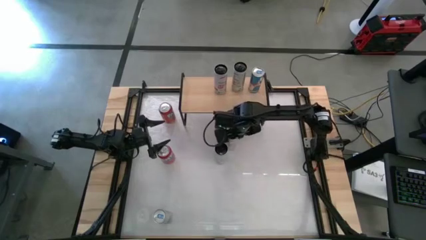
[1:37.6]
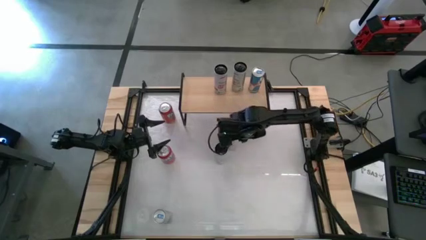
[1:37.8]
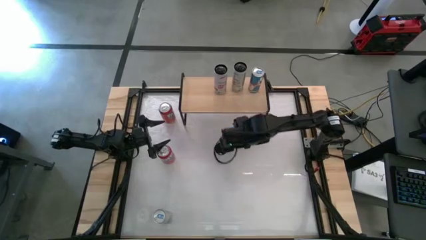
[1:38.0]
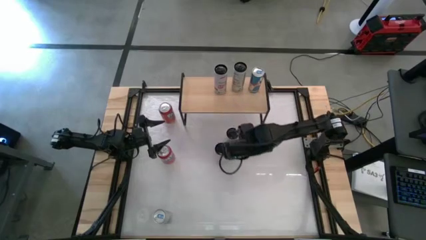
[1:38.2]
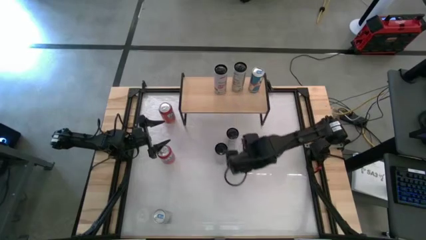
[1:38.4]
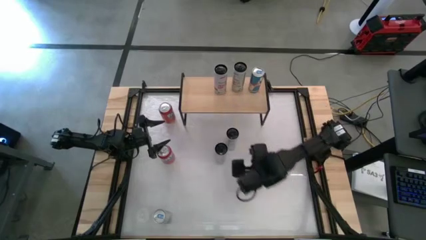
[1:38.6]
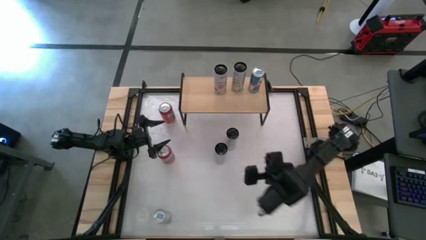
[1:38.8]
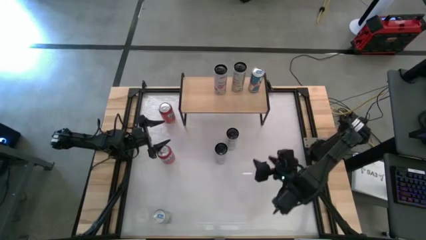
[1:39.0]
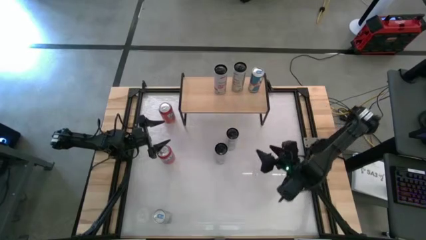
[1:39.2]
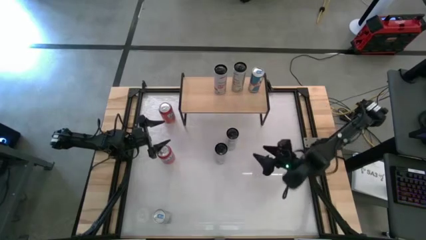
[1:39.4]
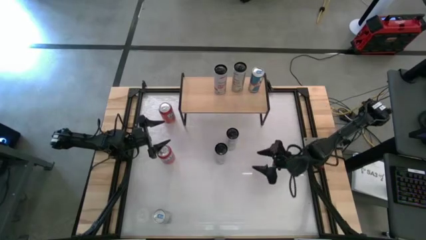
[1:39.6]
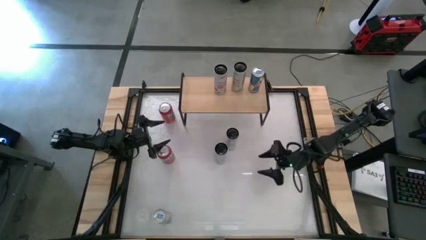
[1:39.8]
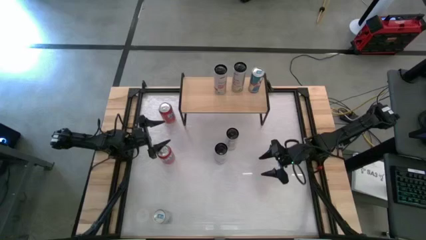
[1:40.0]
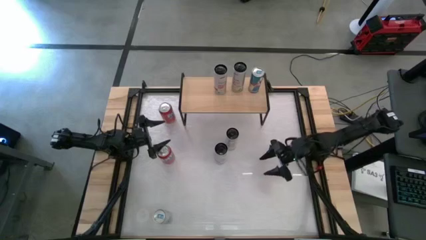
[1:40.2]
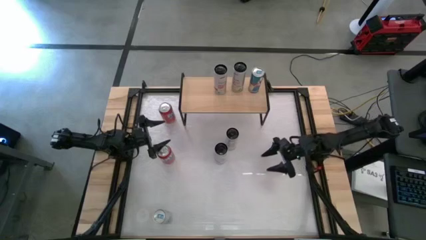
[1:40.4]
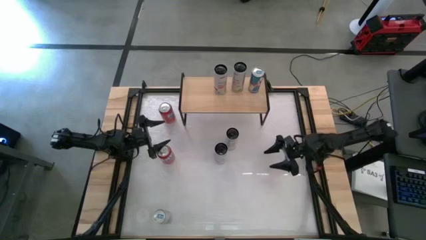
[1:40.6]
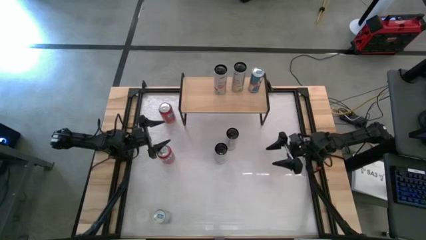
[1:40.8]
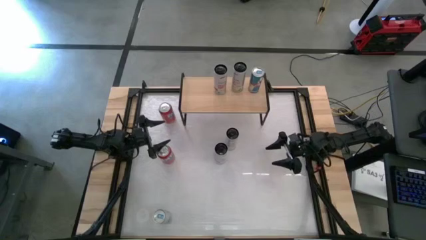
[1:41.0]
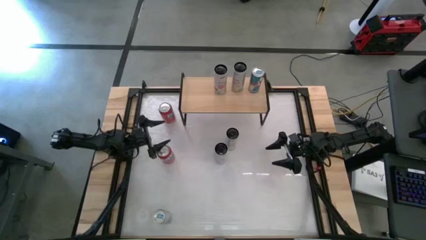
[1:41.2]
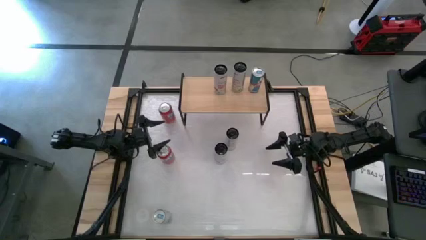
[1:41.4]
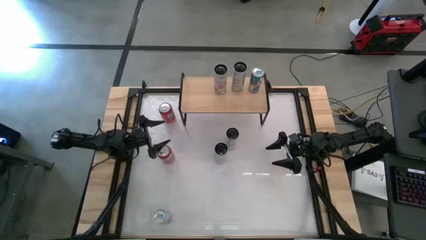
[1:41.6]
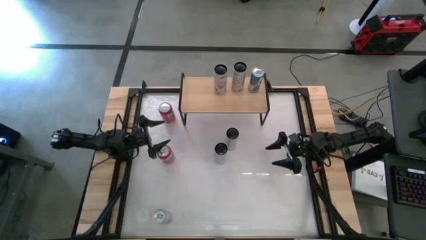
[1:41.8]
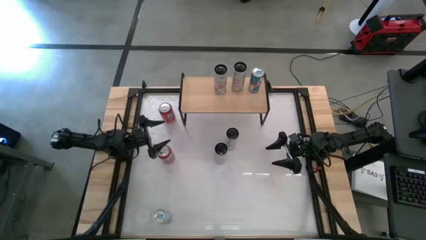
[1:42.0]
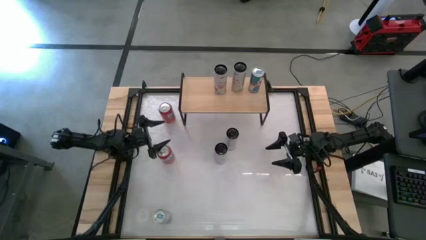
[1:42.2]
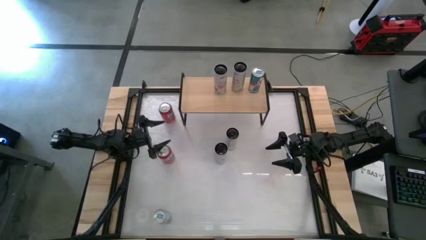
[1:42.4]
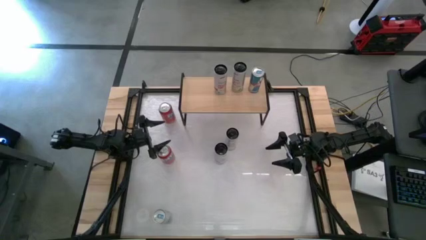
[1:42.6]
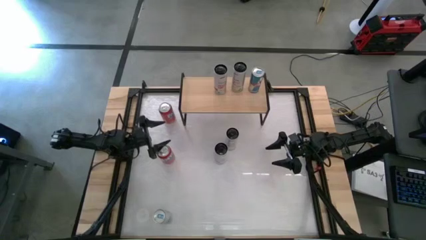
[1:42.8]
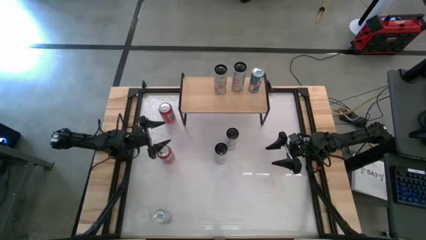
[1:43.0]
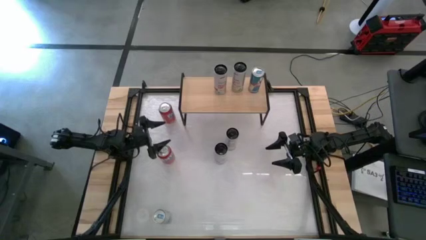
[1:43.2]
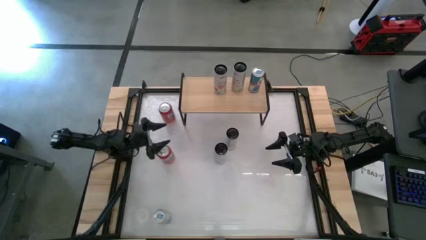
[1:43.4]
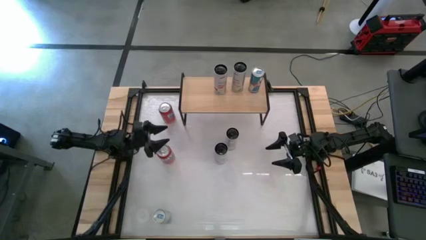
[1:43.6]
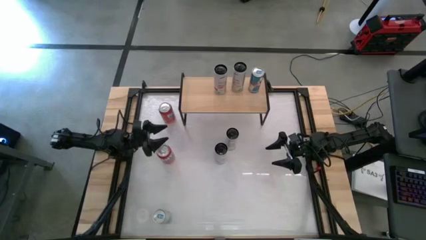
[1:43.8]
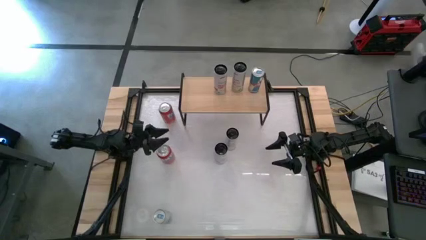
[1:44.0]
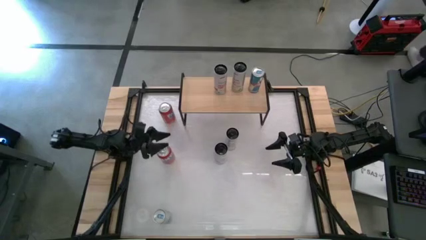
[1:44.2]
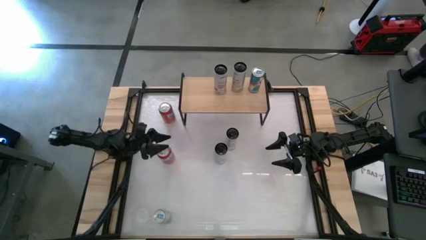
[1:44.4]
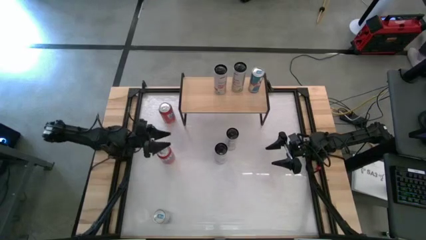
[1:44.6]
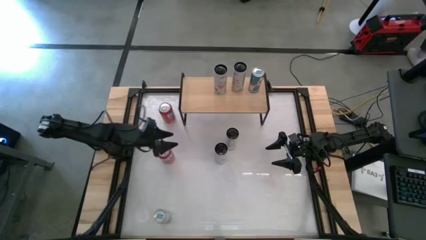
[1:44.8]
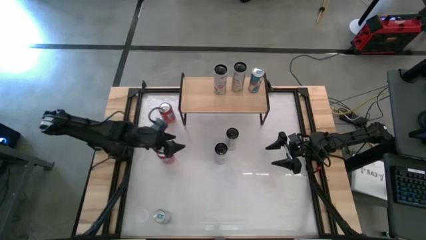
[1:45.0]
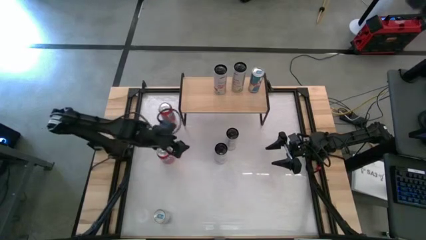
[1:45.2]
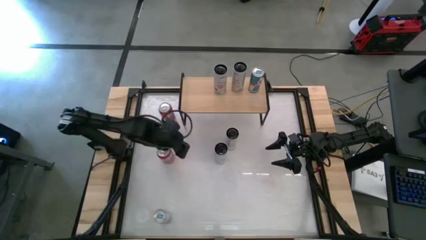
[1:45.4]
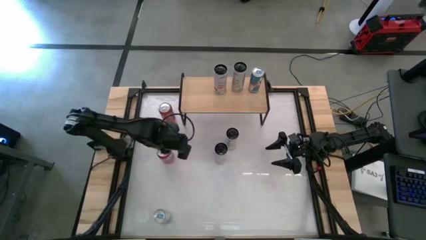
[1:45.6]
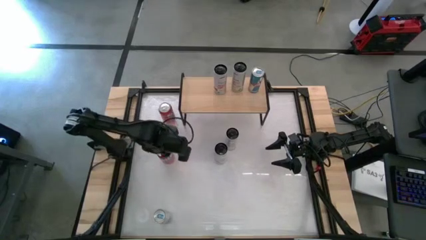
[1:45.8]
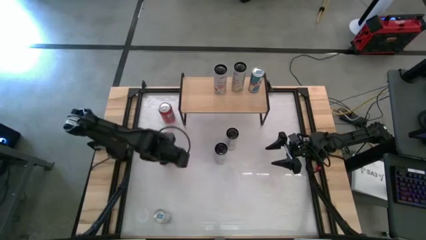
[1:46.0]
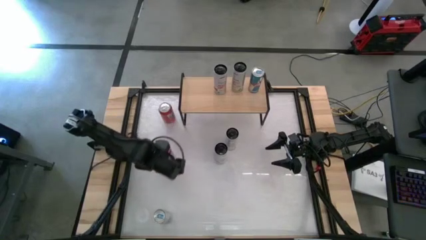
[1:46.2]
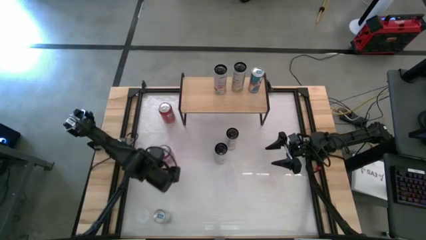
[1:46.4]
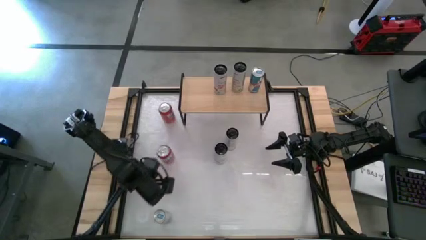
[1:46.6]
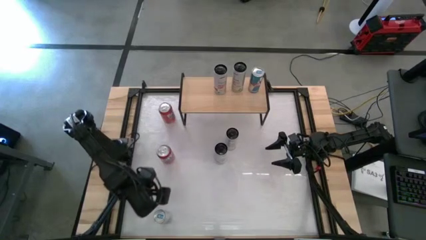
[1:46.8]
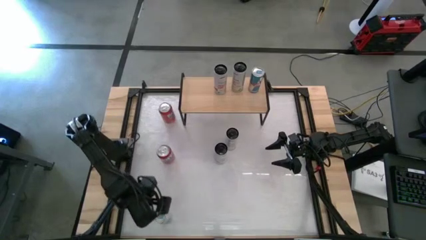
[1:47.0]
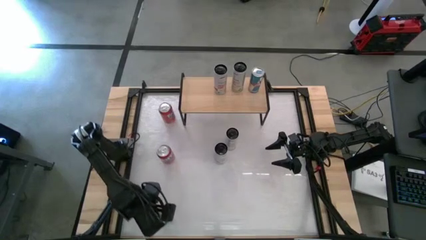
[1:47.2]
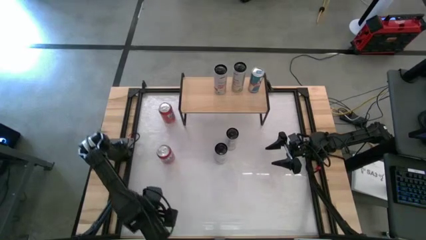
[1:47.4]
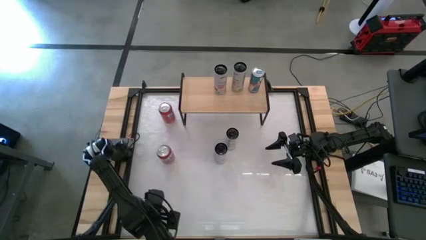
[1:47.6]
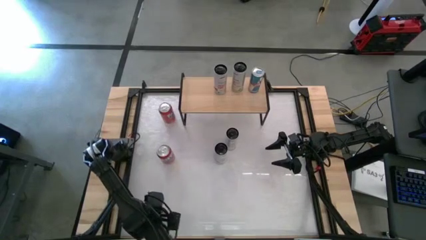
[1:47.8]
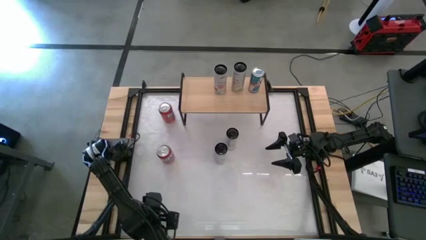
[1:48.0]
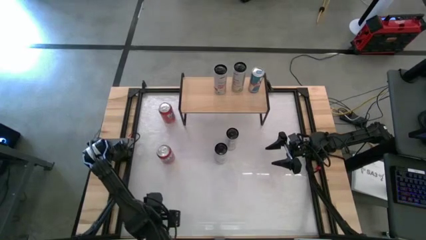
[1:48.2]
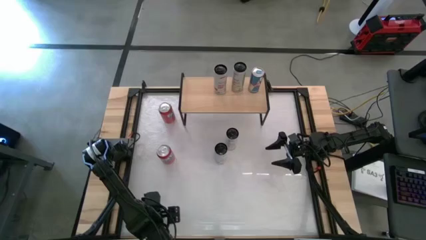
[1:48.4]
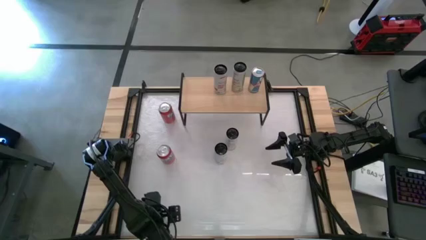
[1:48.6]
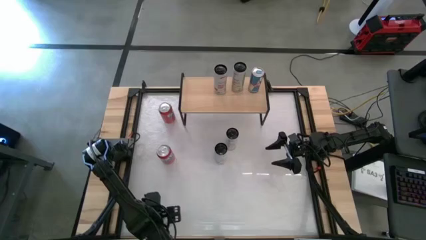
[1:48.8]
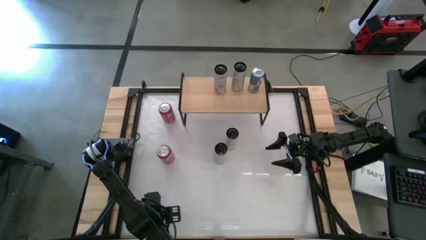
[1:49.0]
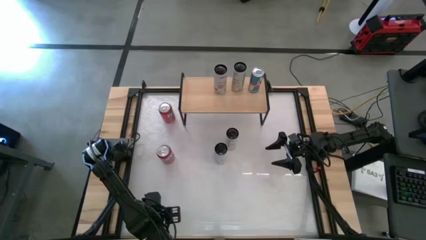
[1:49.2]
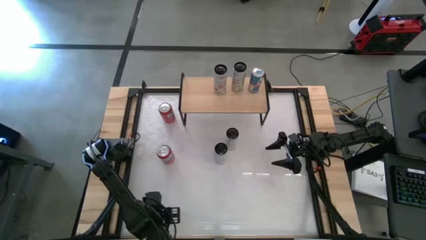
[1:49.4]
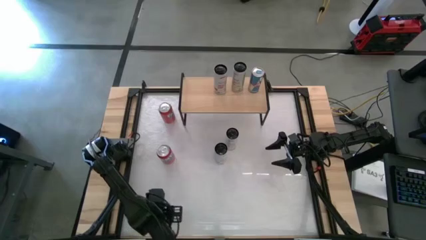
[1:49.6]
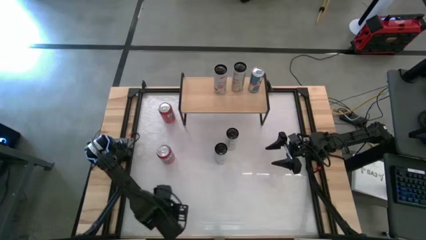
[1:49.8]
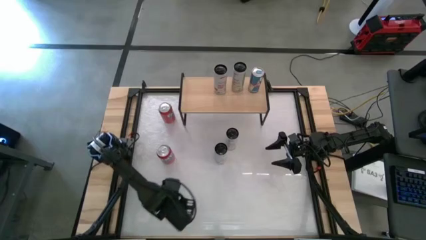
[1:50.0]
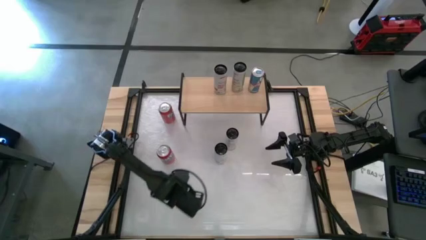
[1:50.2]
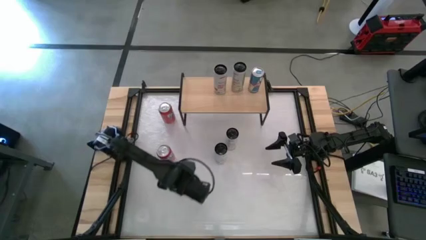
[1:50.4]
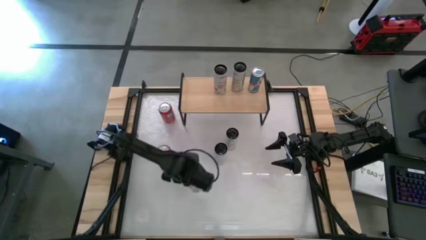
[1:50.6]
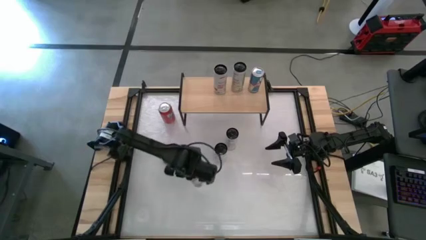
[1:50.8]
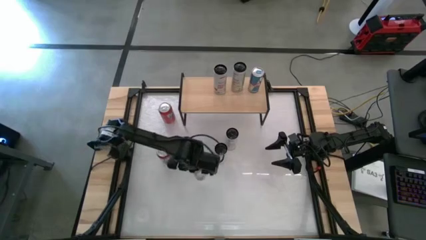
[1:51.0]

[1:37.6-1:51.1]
Task: Place canned beverage on shelf
Put the blue soda can on the shelf aligned with the other blue soda can

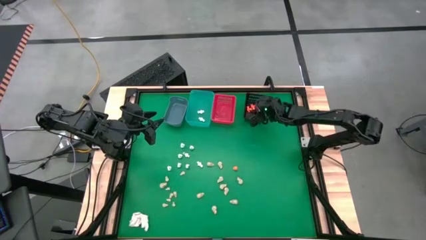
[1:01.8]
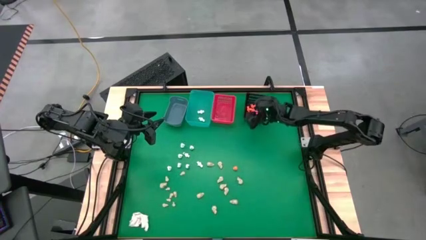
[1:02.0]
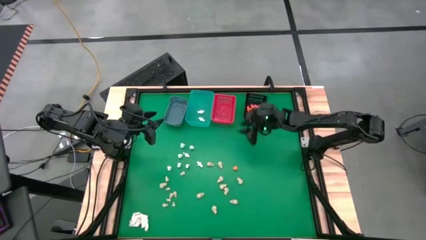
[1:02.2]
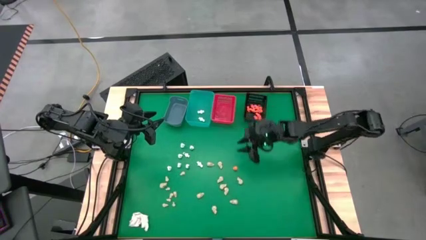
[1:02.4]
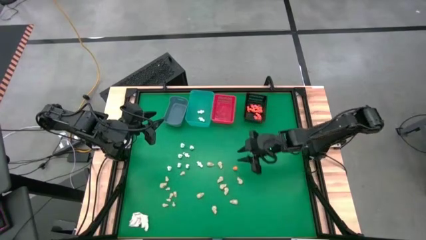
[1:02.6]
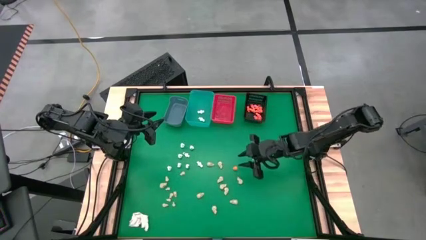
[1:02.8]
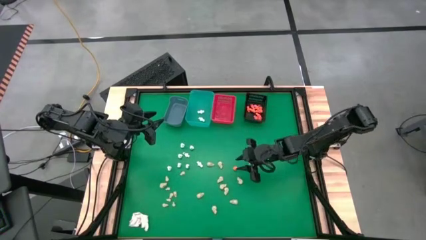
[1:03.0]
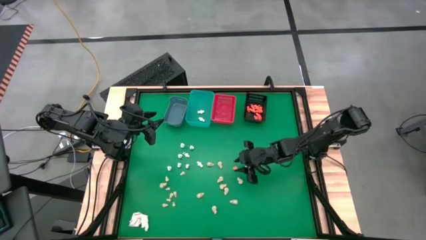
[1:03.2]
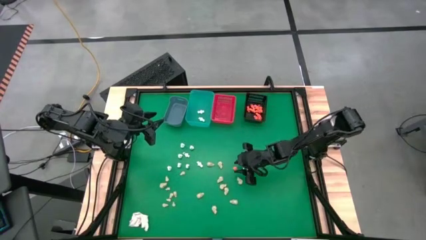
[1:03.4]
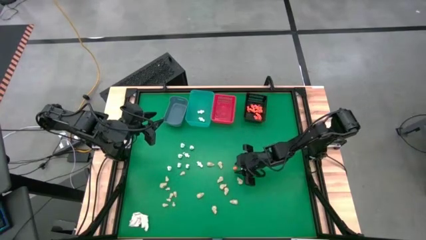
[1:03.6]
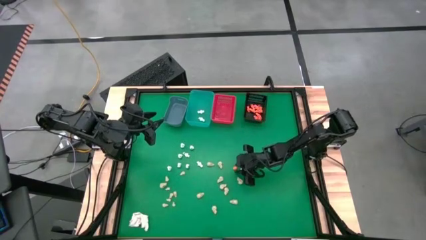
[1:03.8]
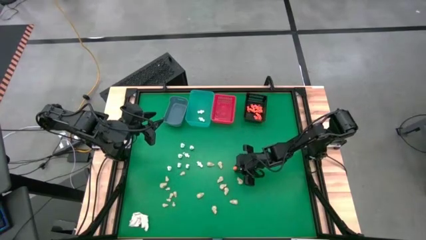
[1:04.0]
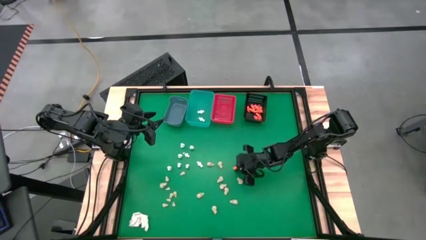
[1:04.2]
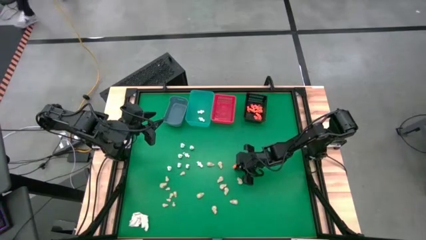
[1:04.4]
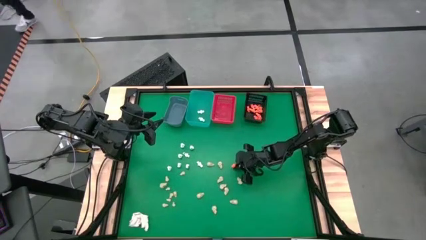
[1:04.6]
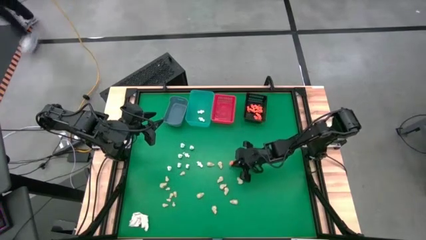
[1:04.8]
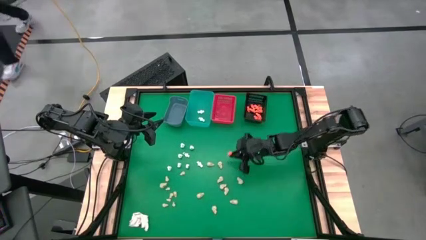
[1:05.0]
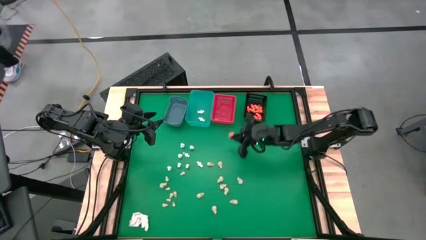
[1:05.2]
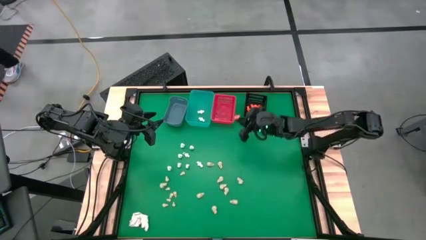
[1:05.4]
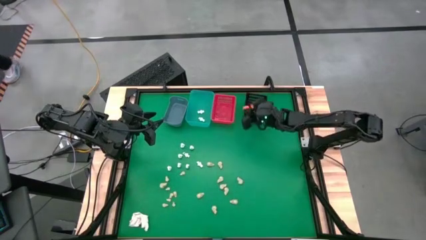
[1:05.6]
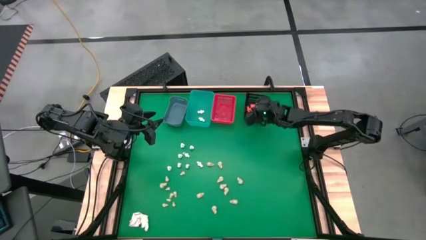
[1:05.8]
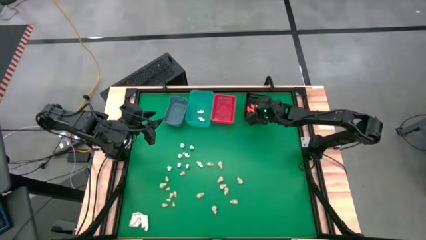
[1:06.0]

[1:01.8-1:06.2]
Task: Sort Halloween decoration
Put the orange skeleton toy into the black bin
